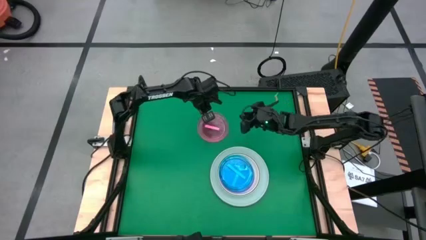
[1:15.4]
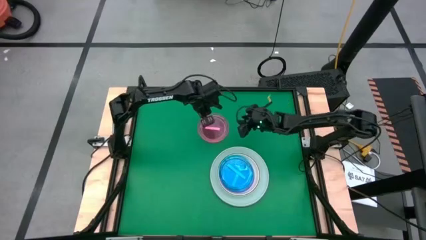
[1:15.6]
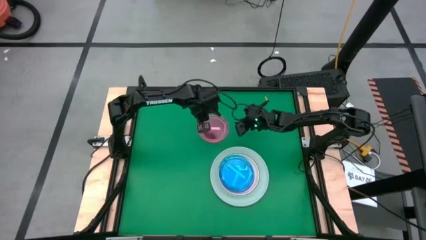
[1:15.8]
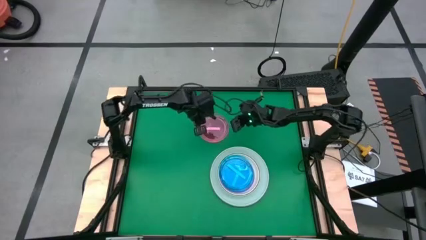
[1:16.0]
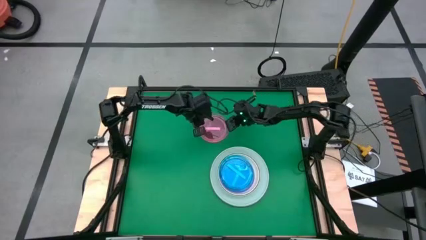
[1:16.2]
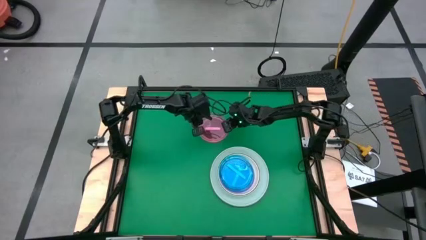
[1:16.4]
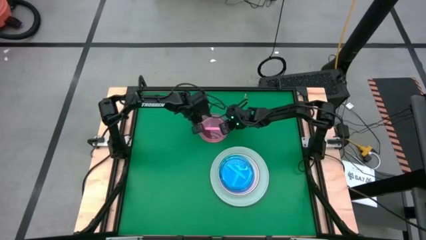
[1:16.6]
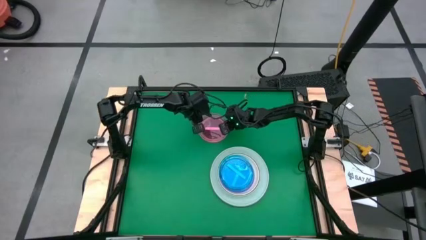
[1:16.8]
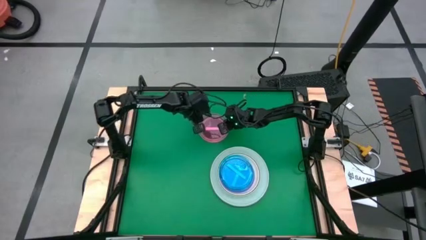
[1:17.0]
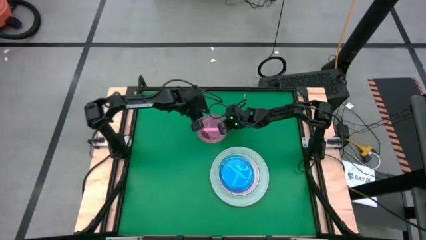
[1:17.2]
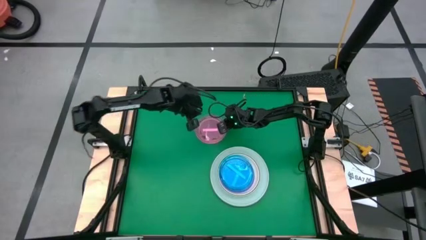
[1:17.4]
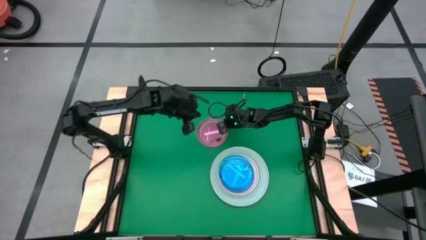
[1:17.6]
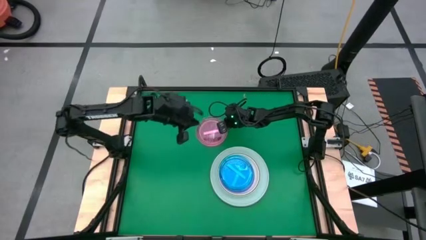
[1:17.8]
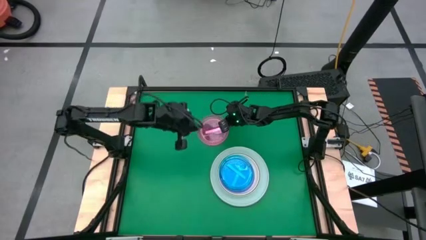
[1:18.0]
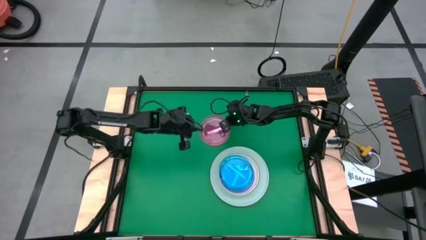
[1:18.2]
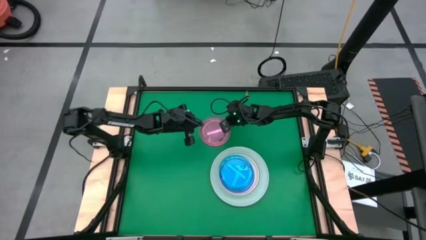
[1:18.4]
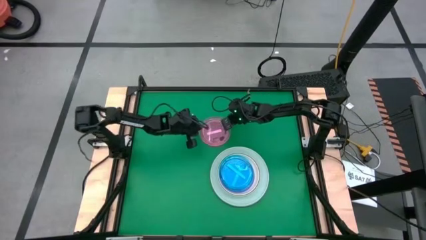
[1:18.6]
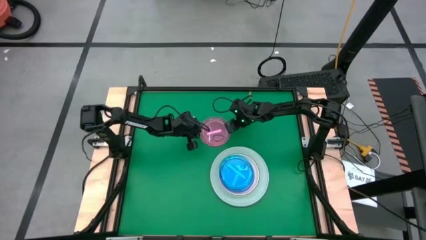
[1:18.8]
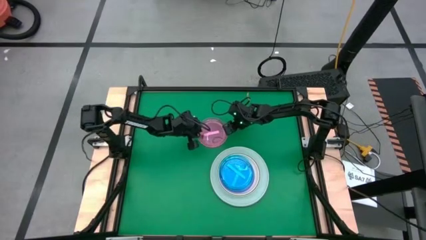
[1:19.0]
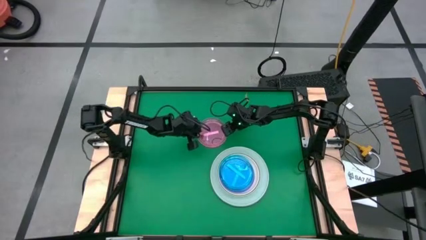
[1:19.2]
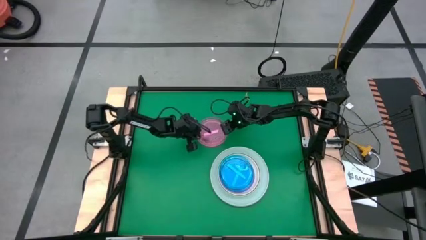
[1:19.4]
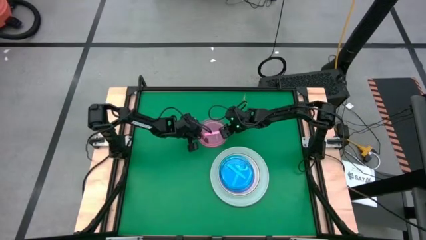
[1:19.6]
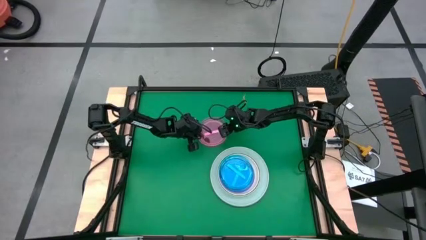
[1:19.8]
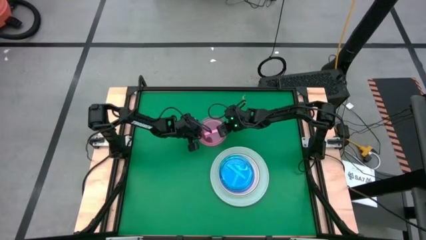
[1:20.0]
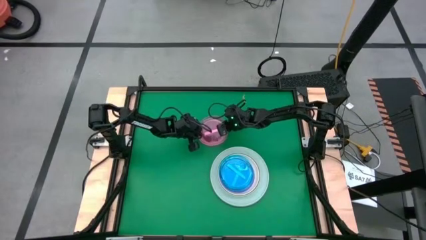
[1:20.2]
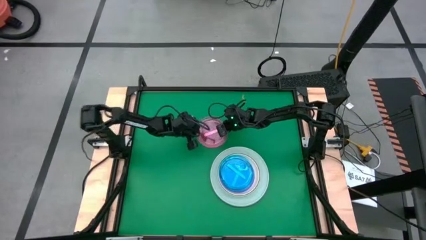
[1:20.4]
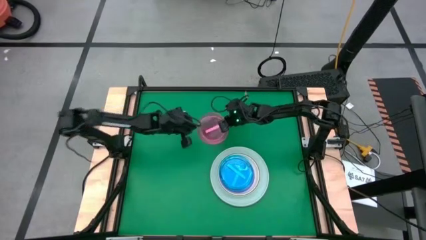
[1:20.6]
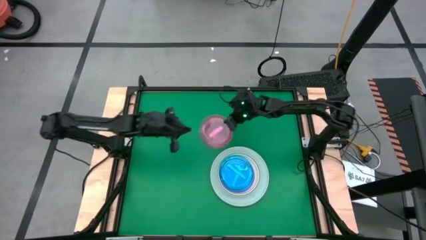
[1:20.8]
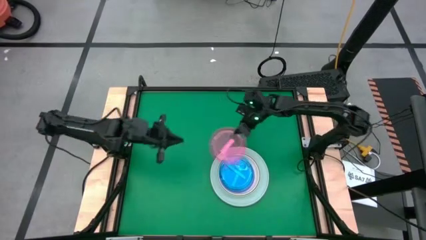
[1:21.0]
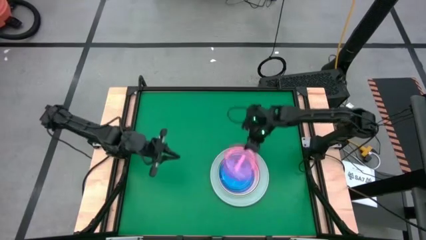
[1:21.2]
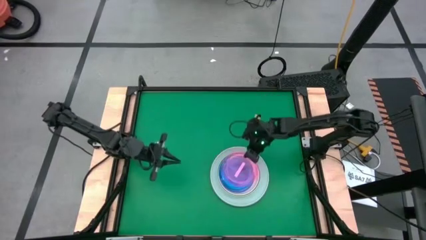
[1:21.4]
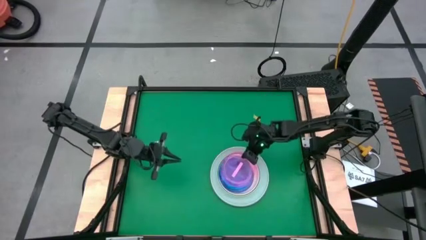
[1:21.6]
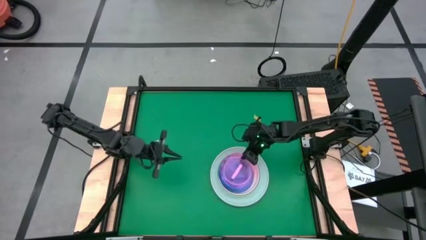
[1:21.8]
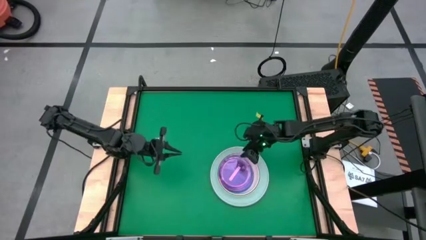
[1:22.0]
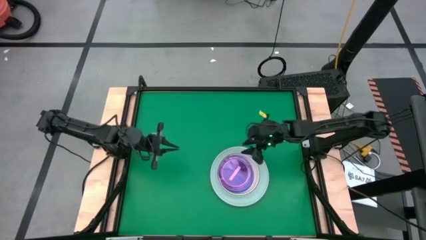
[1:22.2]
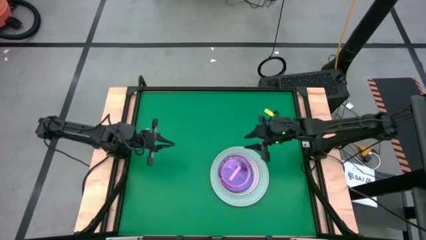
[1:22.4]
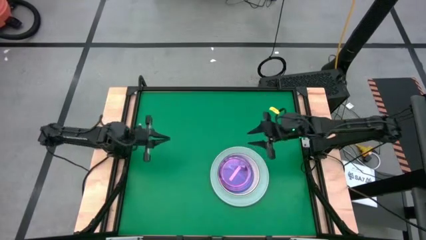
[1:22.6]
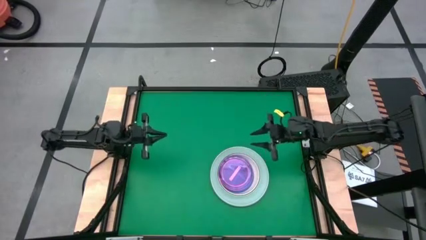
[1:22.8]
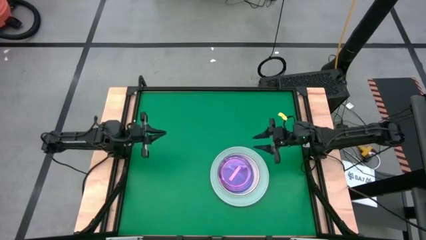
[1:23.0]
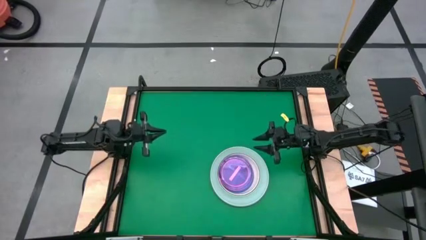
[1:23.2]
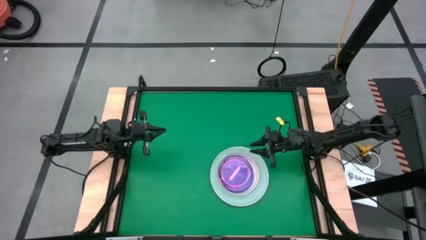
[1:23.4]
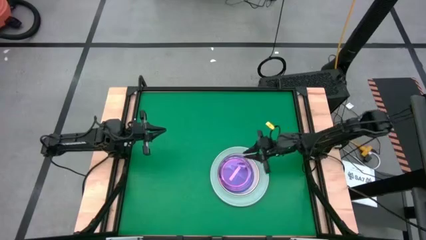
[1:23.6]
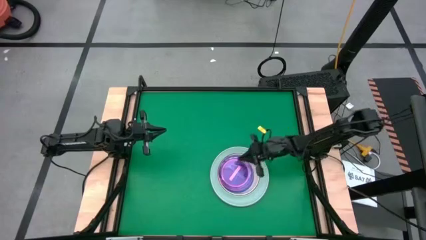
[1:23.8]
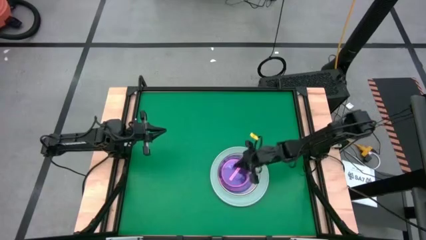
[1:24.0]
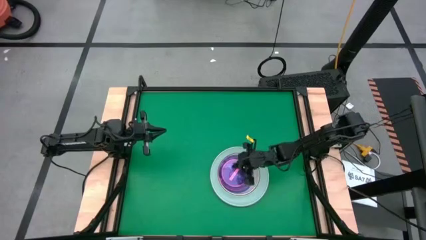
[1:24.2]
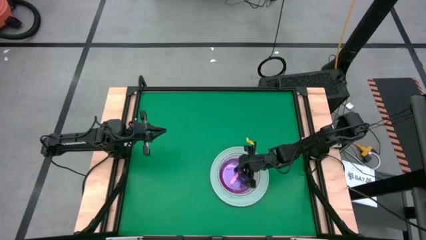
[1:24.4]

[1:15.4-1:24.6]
Task: Stack plastic plates
Stack the pink plate on top of the blue plate

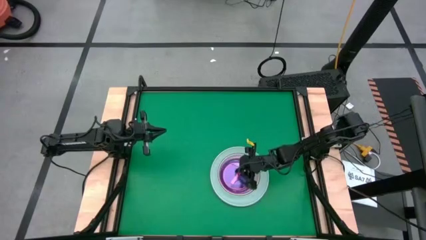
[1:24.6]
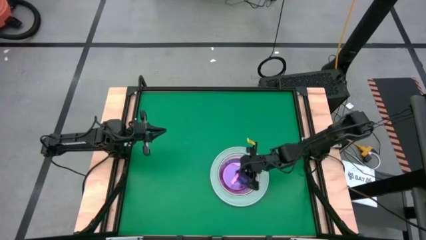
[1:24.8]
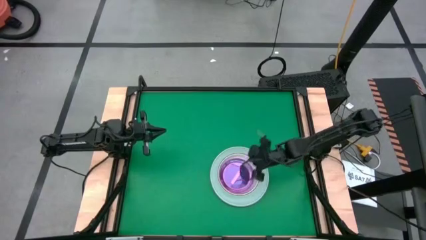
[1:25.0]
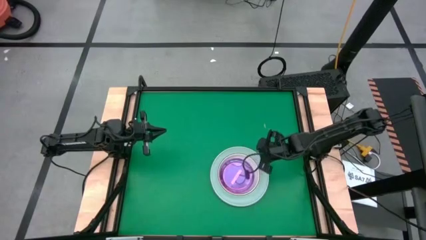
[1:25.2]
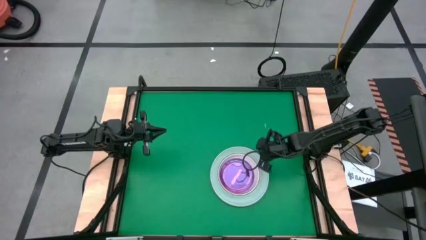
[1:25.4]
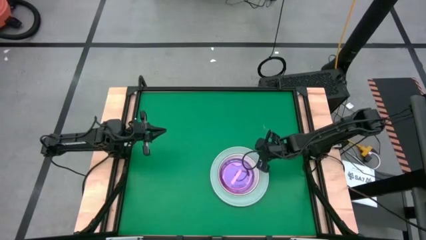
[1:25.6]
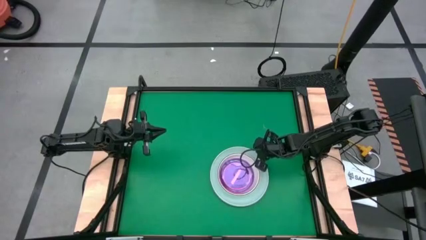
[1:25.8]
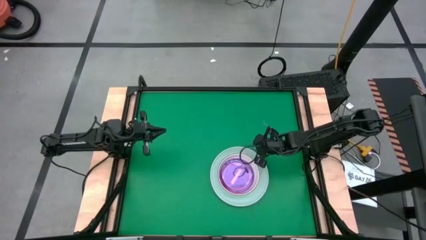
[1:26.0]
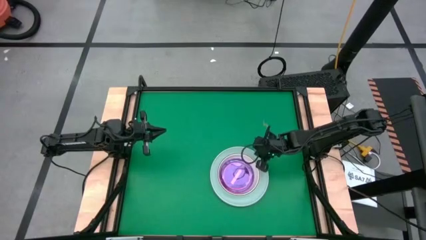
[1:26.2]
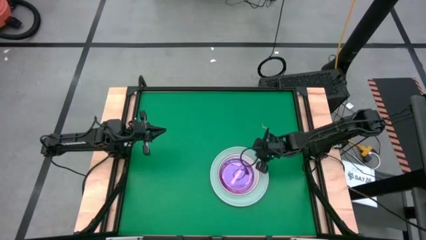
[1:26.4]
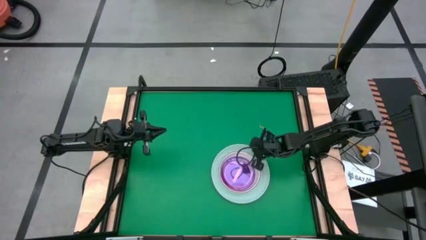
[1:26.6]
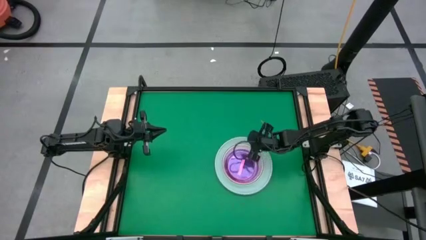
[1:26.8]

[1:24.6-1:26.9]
Adjust the stacked plates on the table

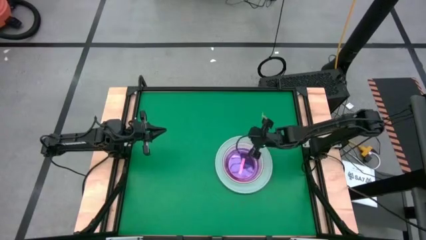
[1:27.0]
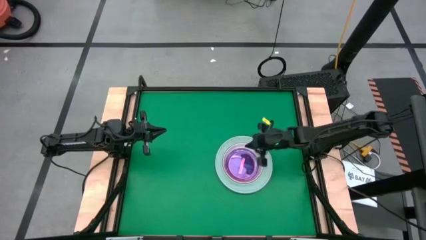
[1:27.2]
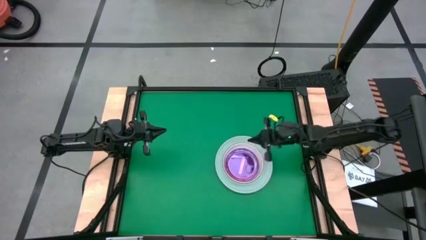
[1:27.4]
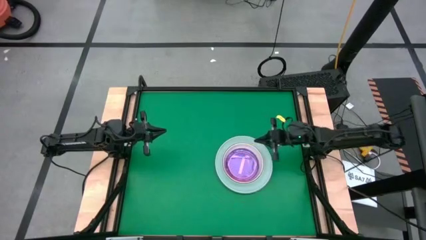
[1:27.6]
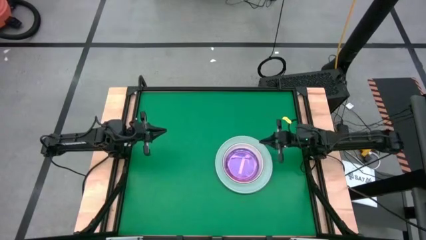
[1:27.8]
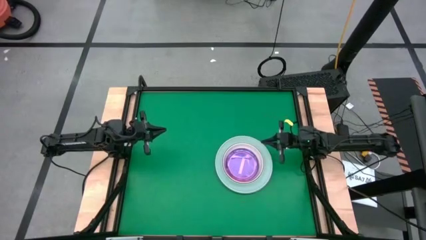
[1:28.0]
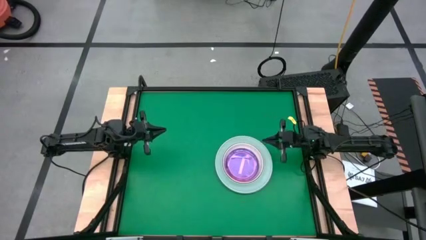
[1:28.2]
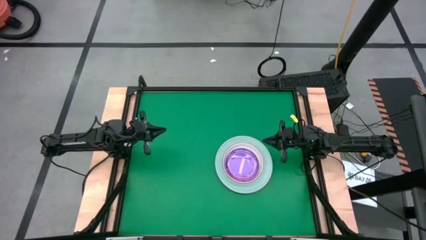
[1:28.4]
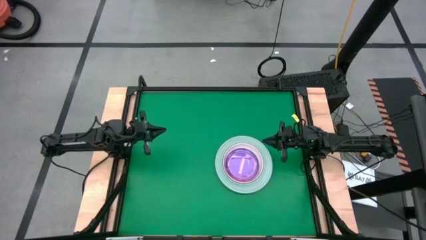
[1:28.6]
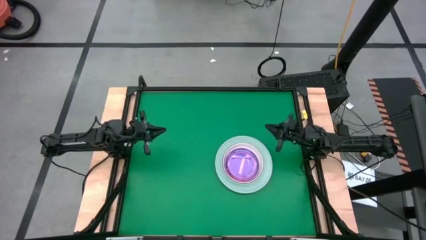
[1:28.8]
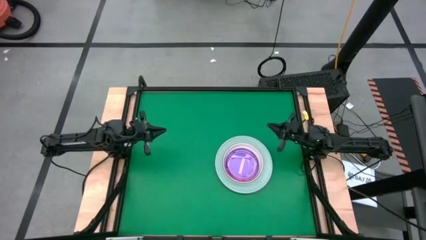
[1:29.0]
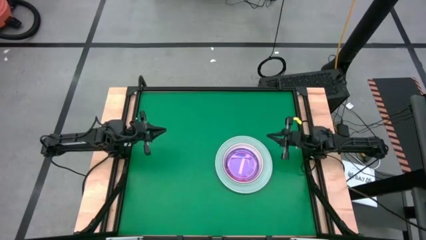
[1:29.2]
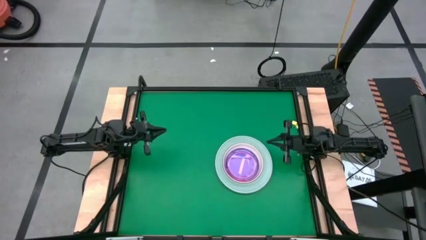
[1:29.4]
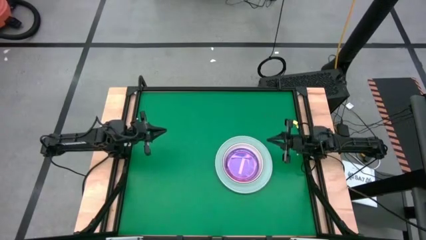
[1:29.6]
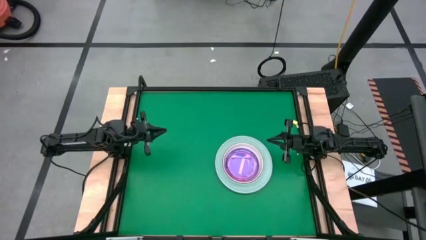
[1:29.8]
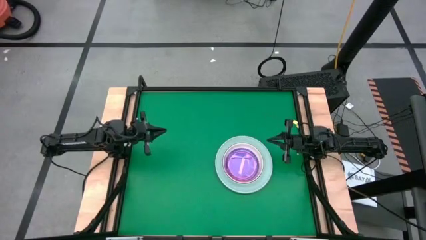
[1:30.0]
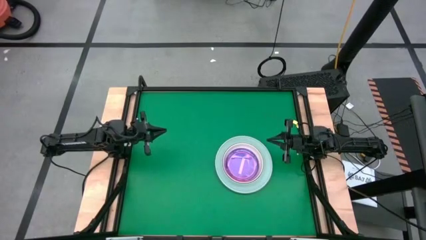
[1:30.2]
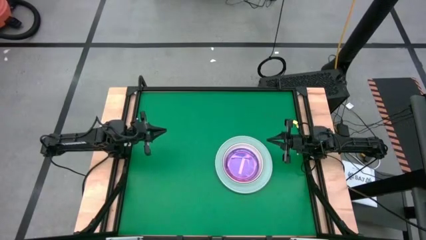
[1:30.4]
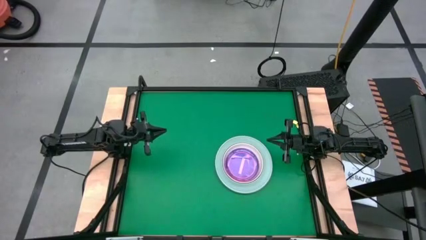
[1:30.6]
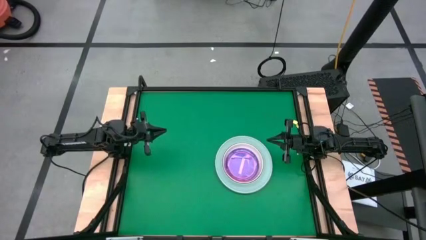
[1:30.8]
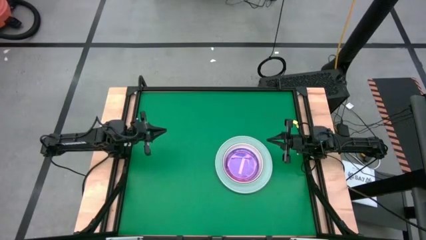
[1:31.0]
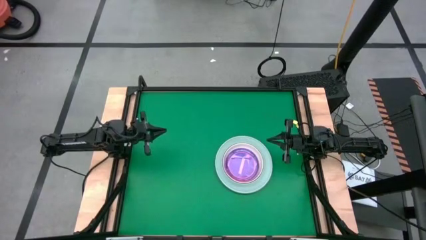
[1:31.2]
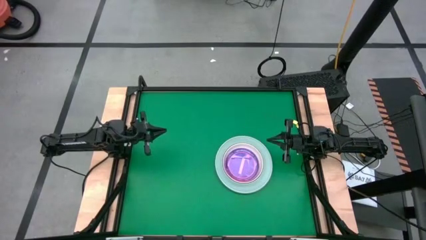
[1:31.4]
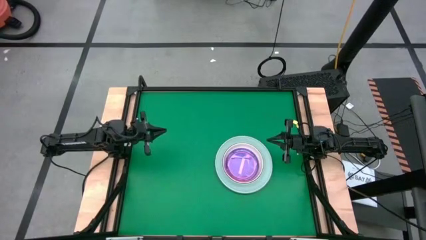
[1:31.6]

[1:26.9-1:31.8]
Return to Home Position
